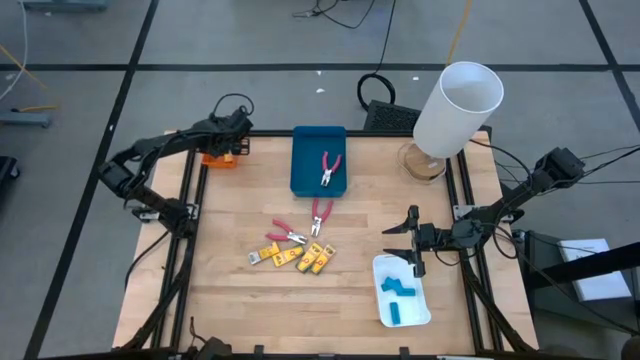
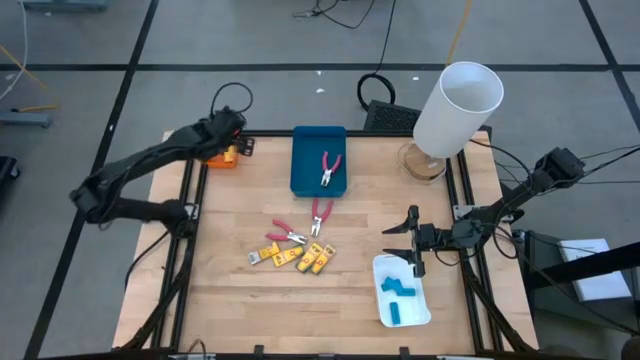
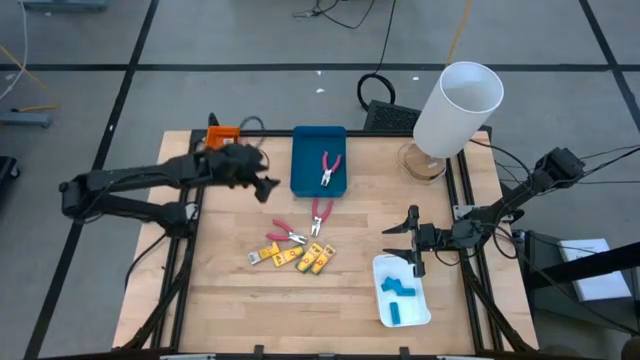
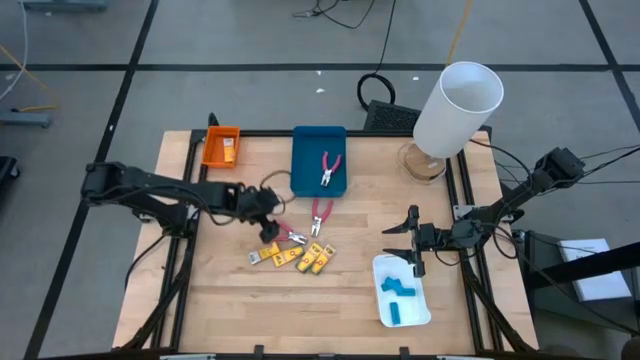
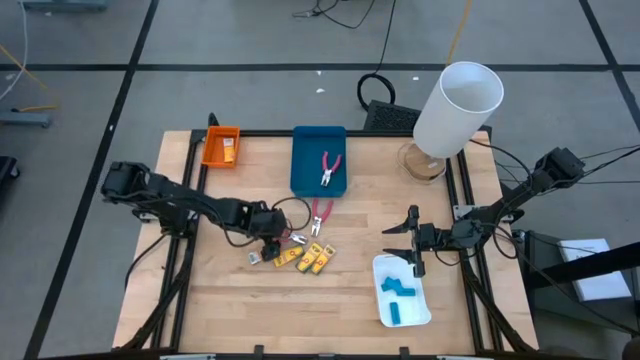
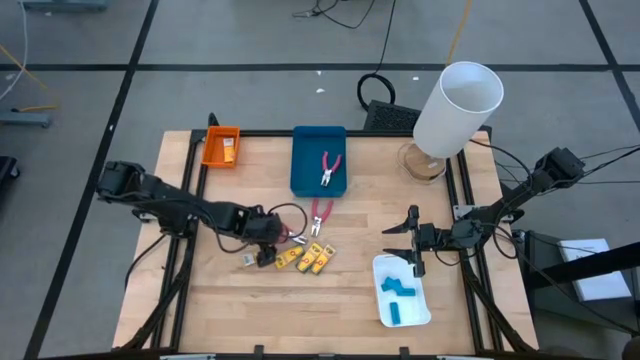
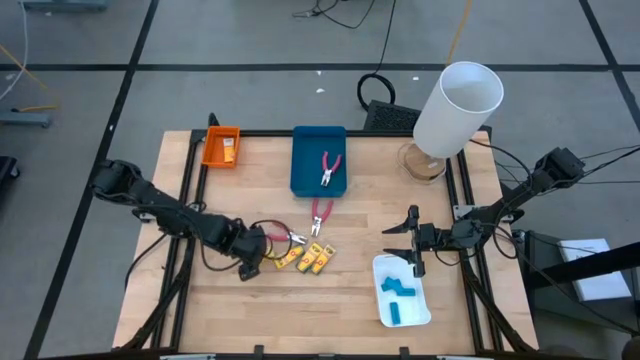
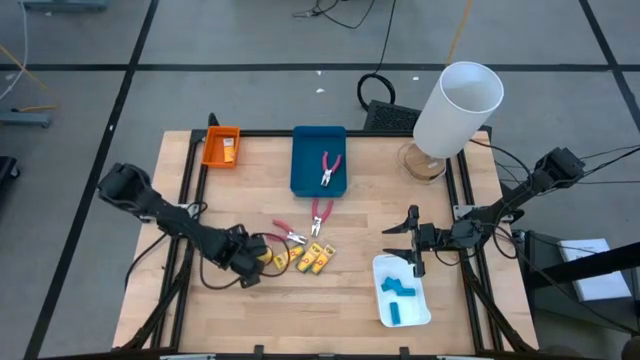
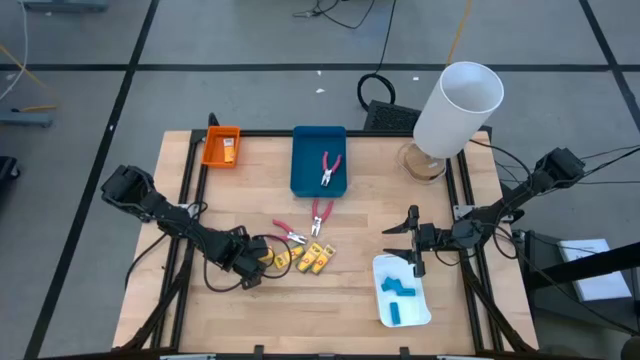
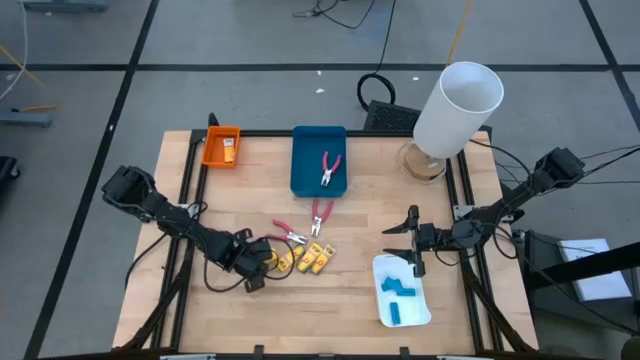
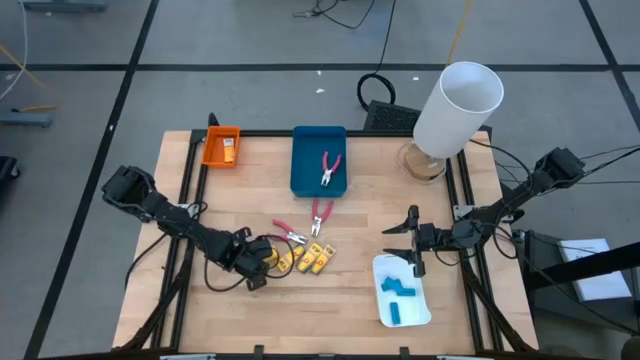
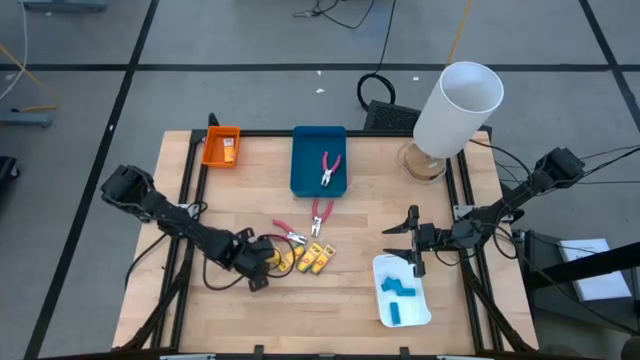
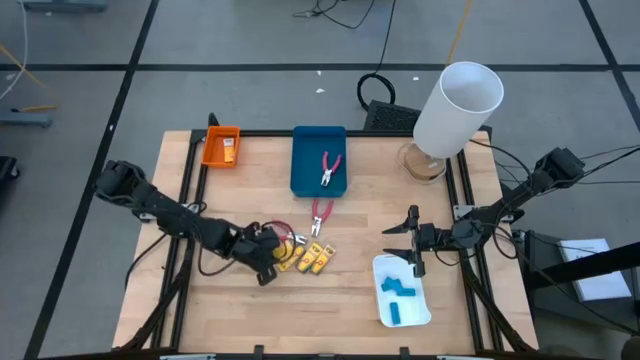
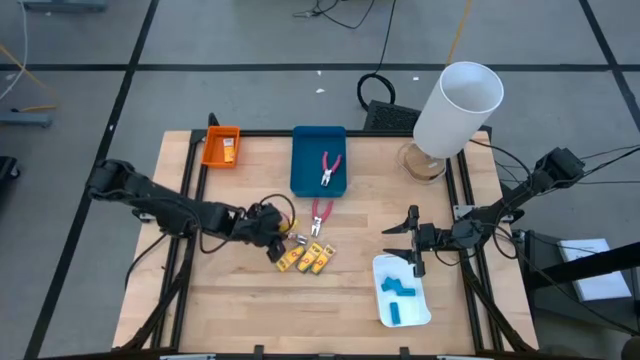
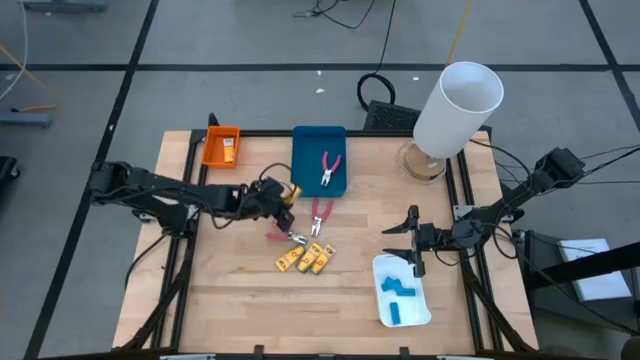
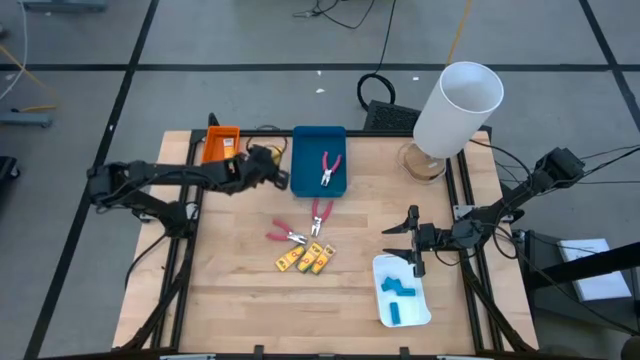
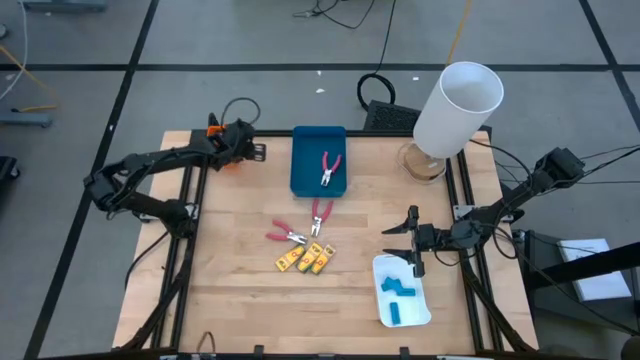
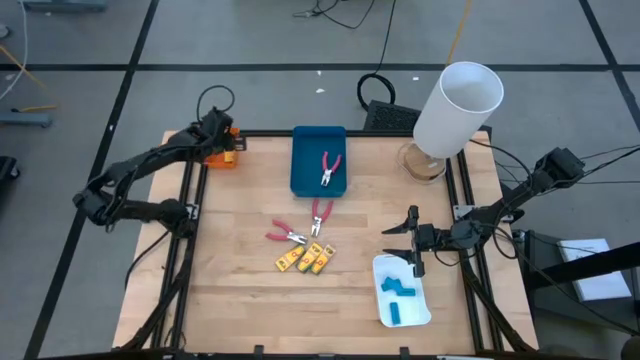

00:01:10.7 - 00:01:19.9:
Task: Pick & Place School Supplies
Put the yellow crayon pack into the orange bin

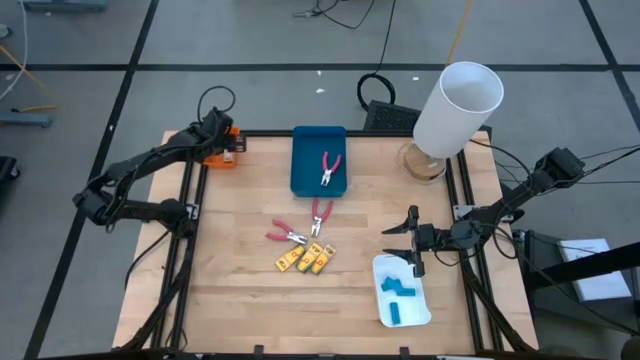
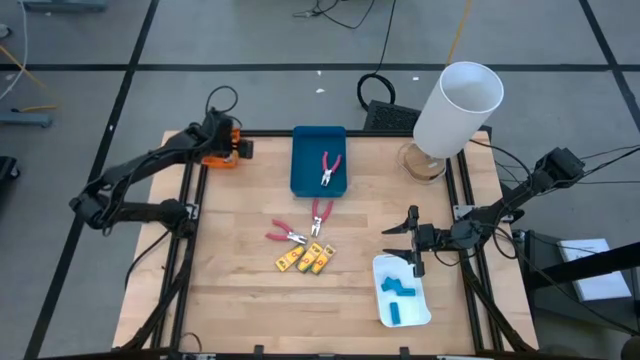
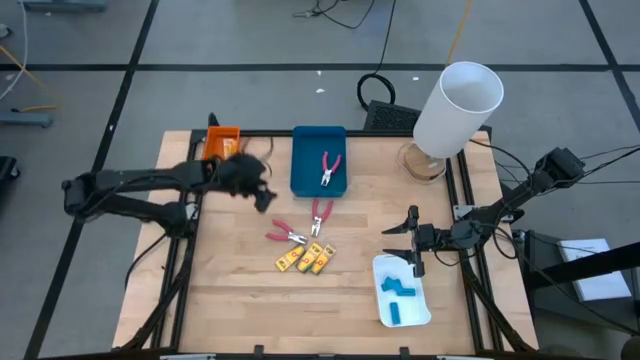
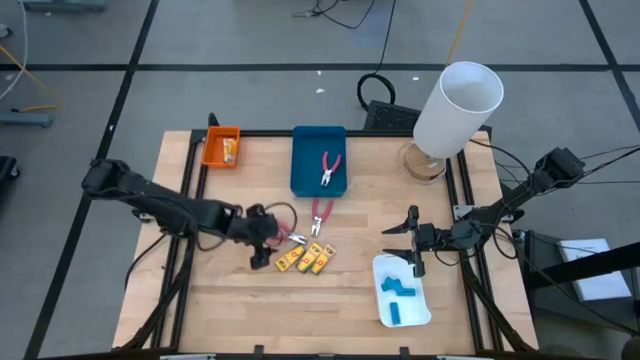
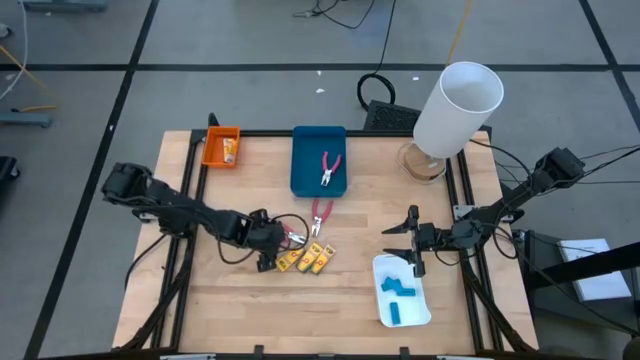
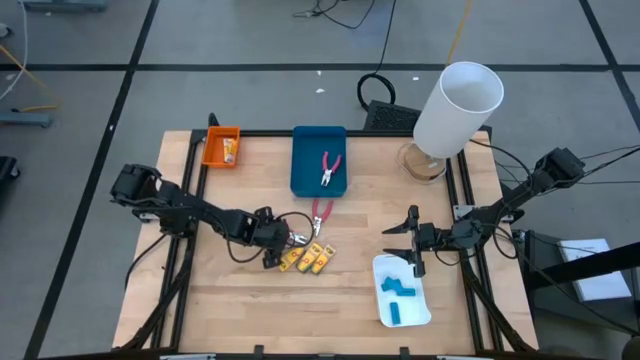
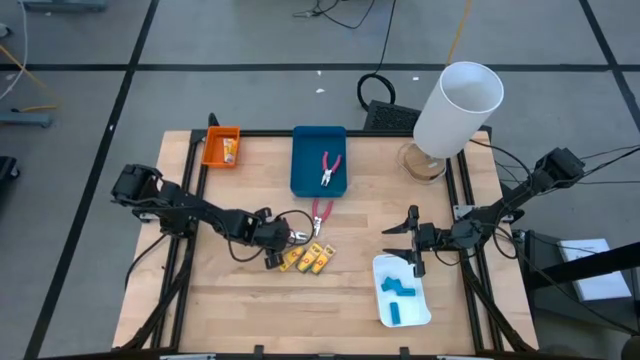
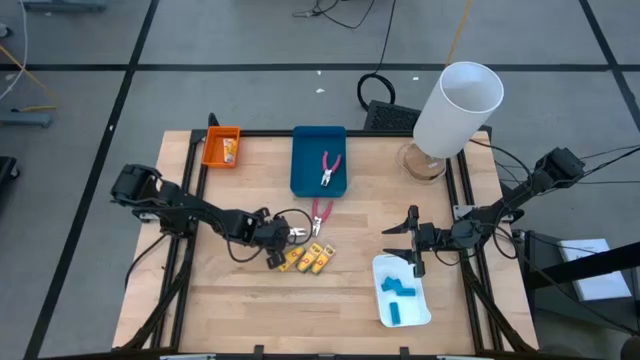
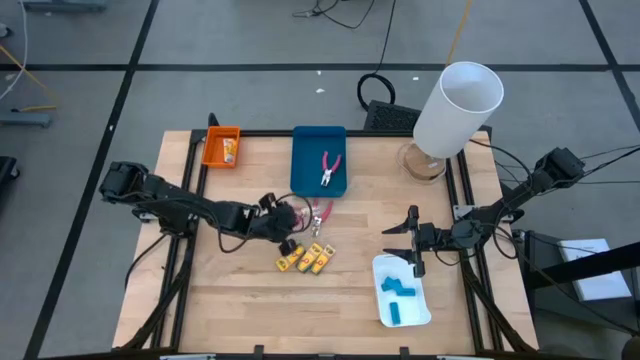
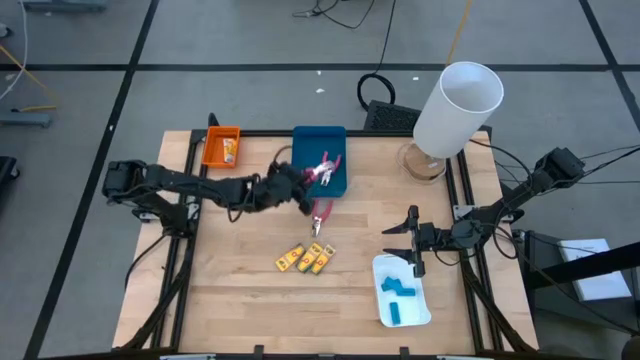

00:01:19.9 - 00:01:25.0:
Put the bottom pink hole puncher into the blue bin

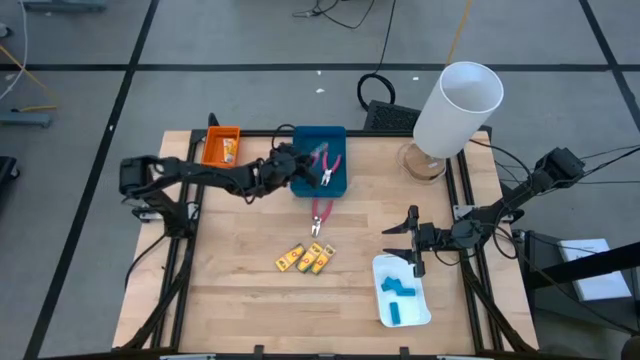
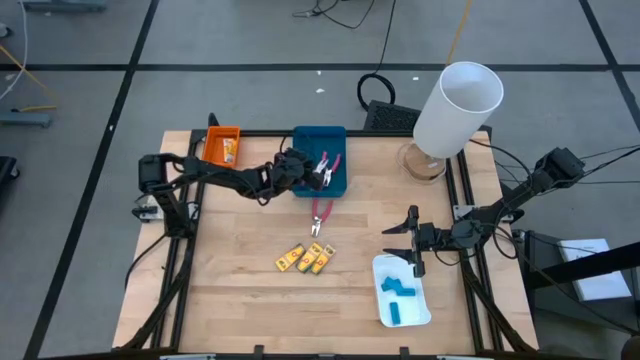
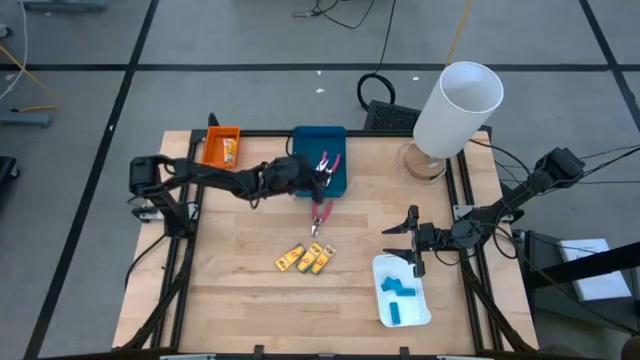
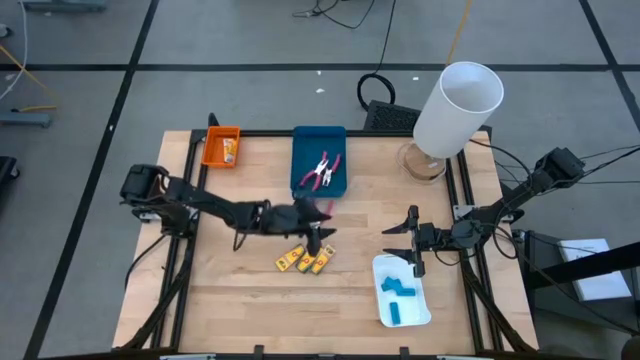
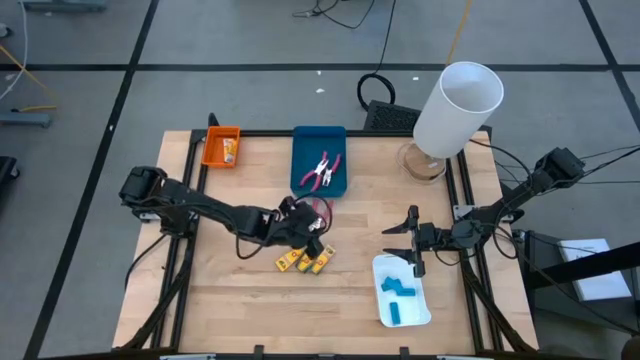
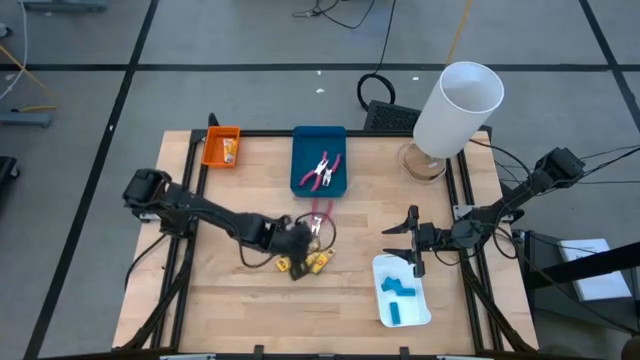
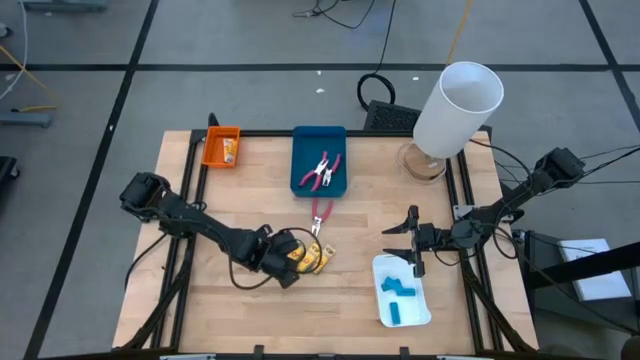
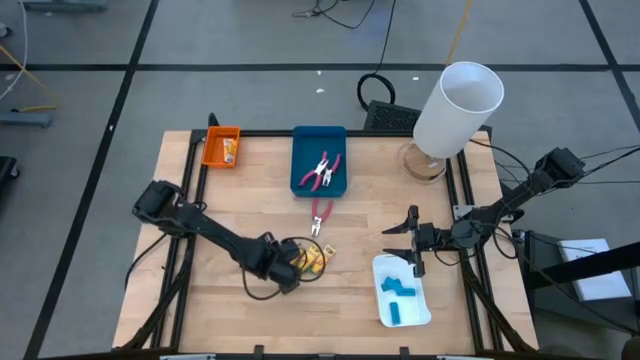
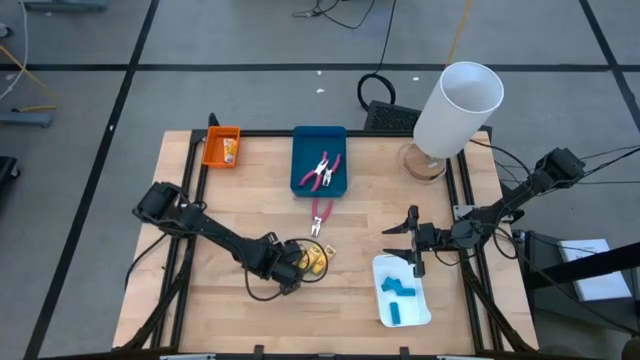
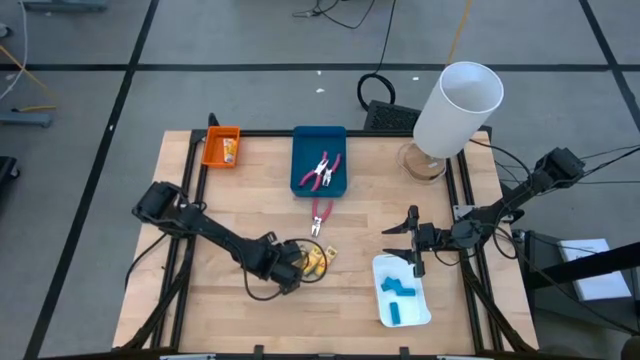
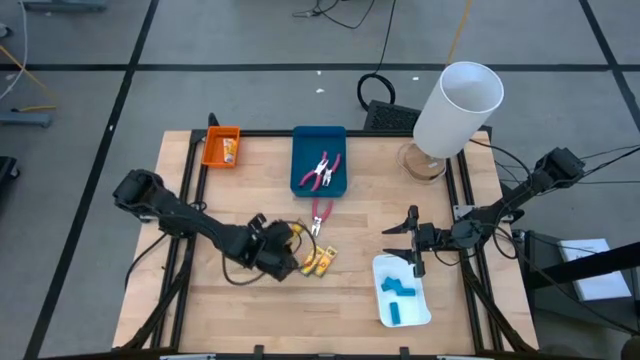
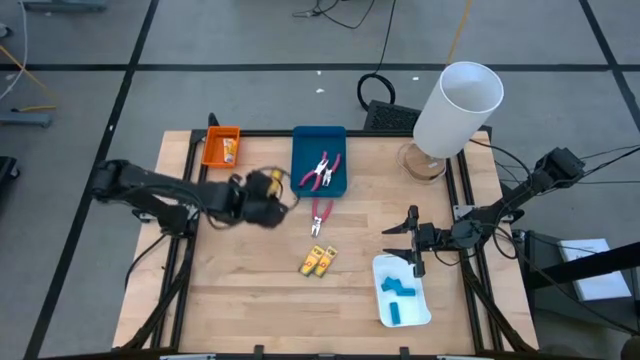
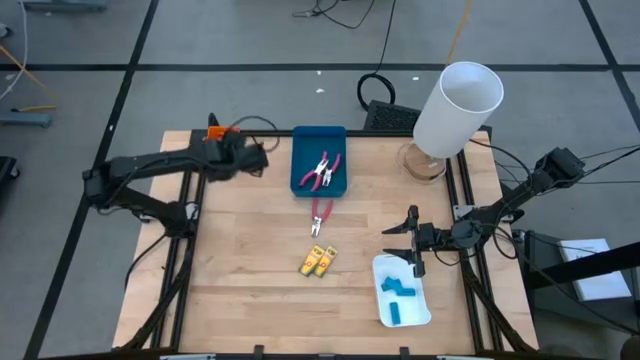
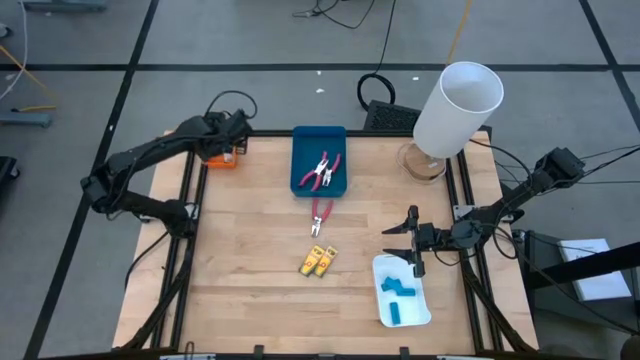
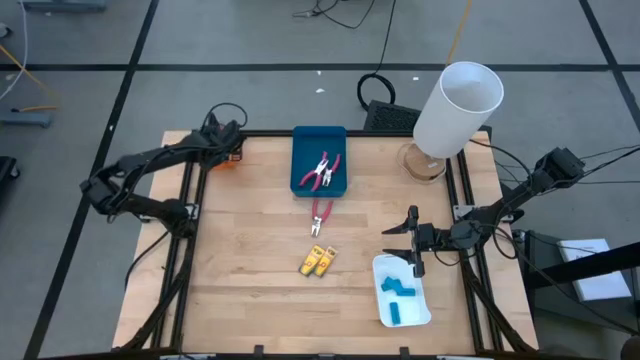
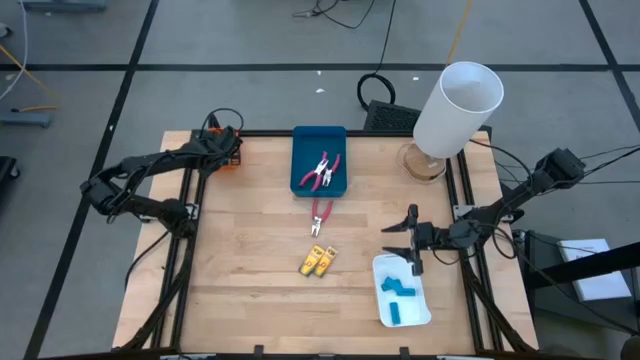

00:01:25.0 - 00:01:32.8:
Put the yellow crayon pack into the orange bin
